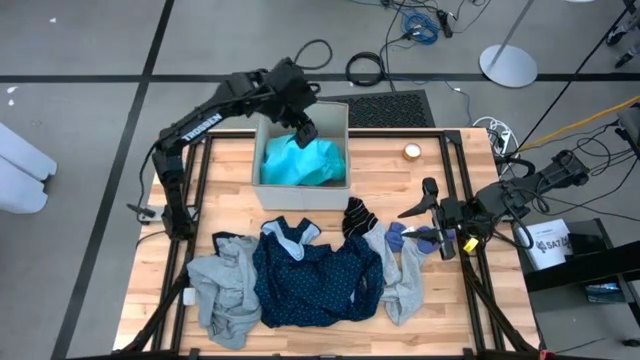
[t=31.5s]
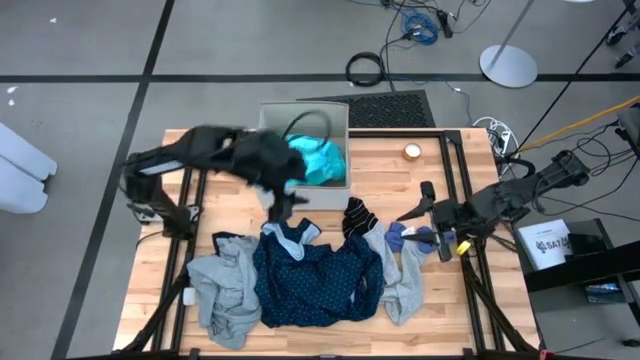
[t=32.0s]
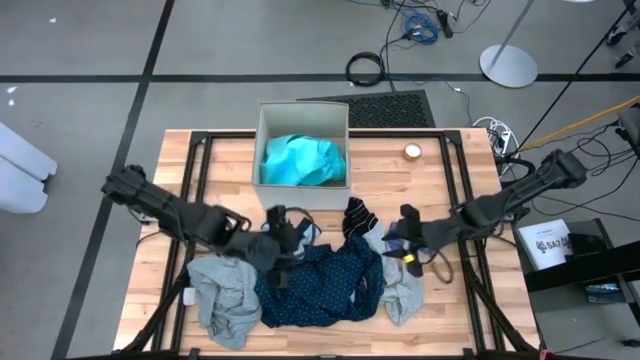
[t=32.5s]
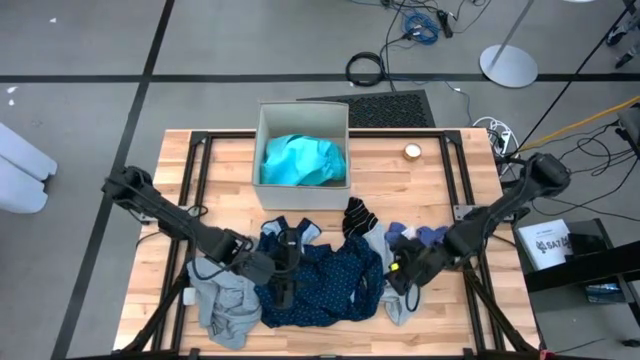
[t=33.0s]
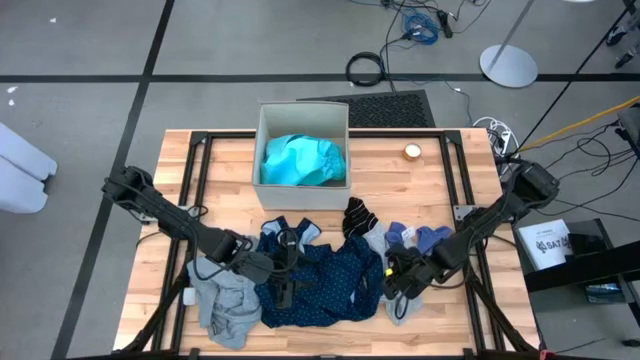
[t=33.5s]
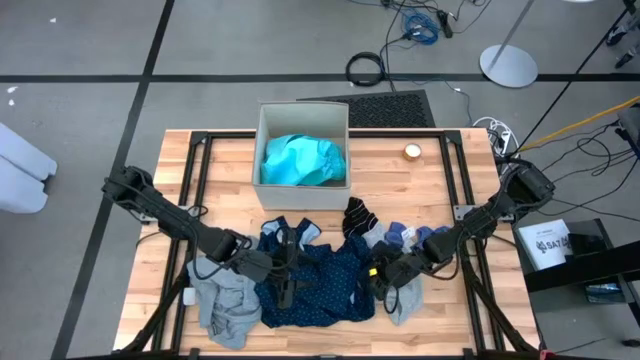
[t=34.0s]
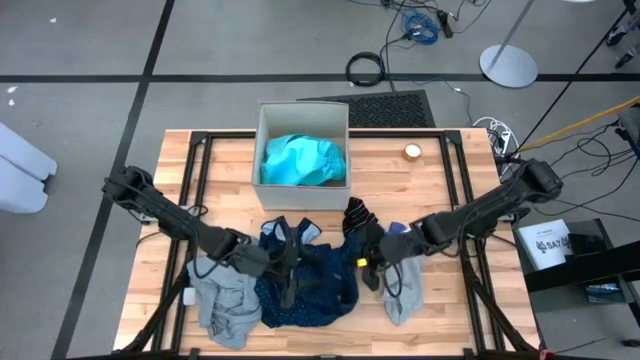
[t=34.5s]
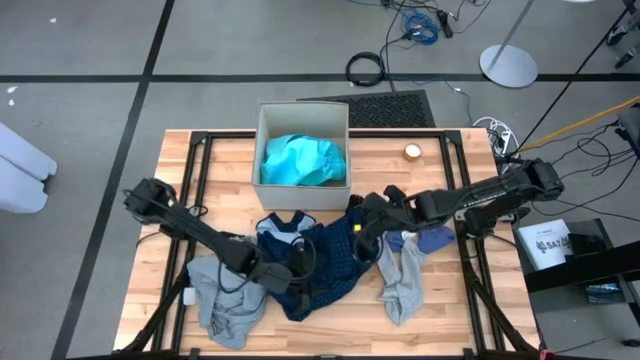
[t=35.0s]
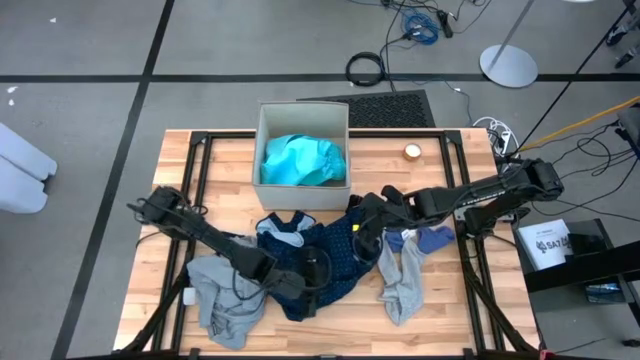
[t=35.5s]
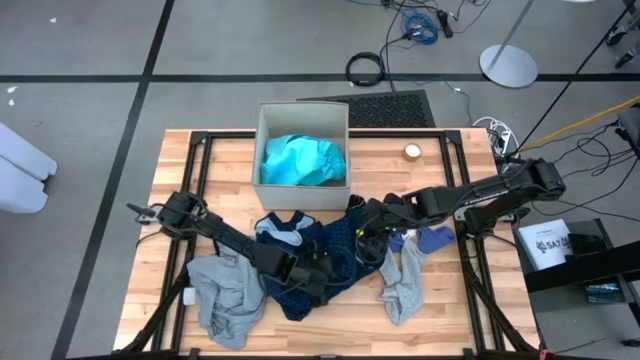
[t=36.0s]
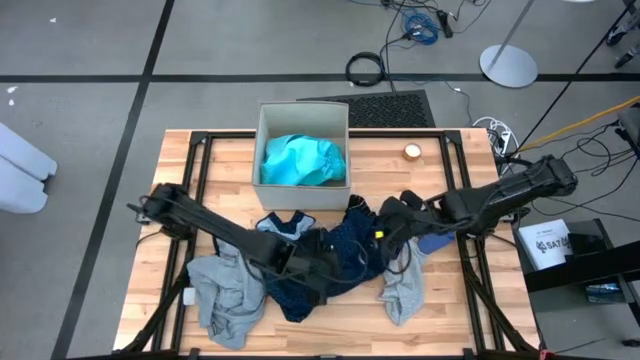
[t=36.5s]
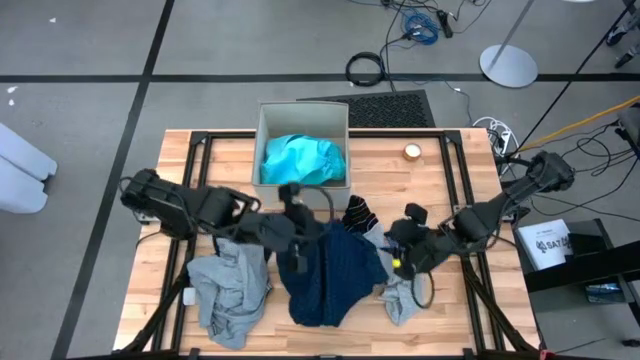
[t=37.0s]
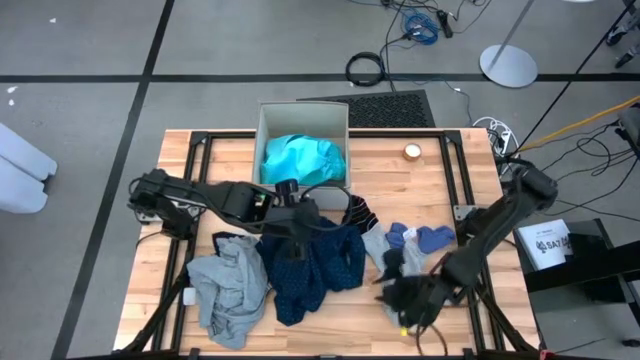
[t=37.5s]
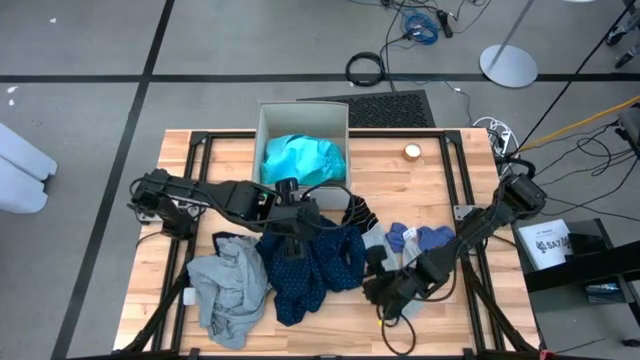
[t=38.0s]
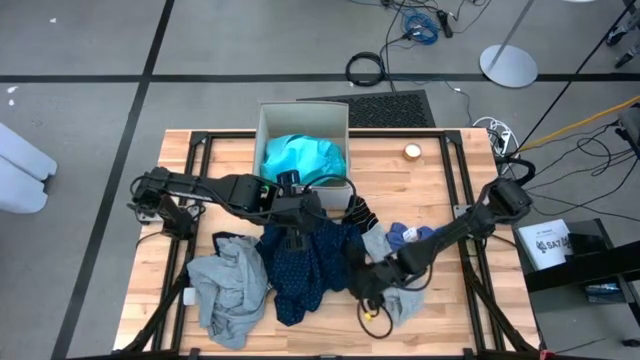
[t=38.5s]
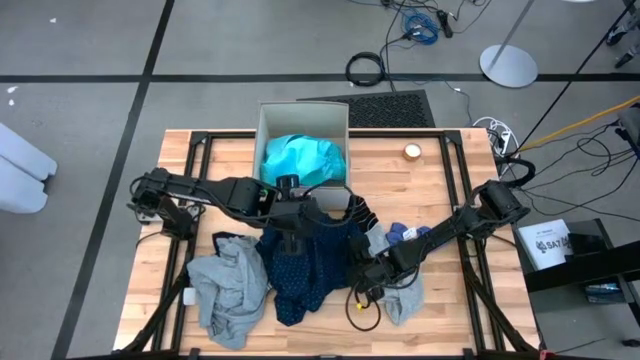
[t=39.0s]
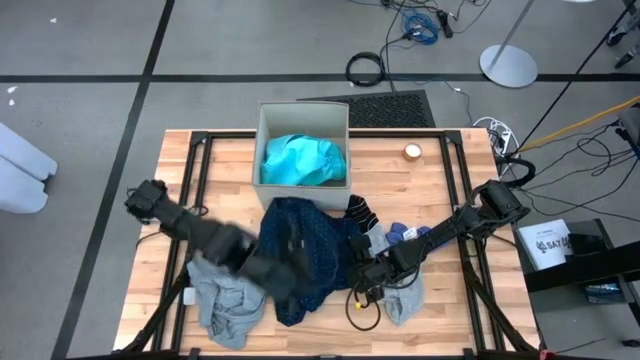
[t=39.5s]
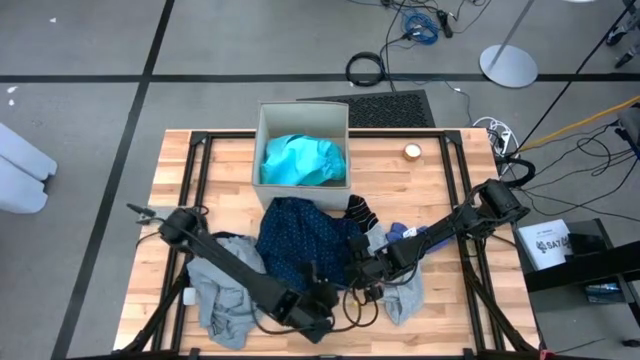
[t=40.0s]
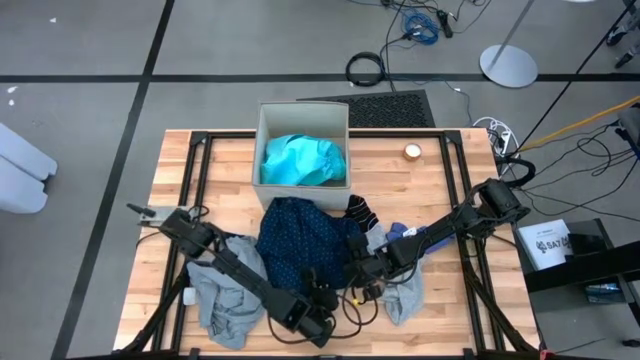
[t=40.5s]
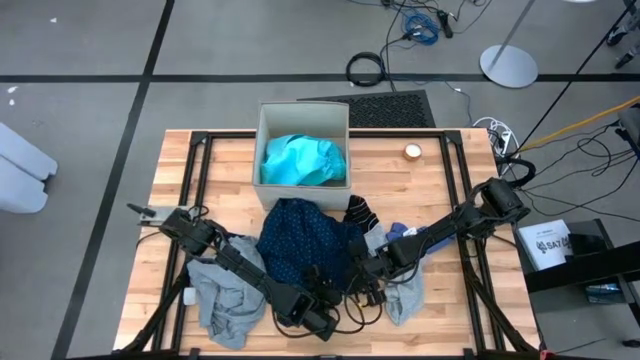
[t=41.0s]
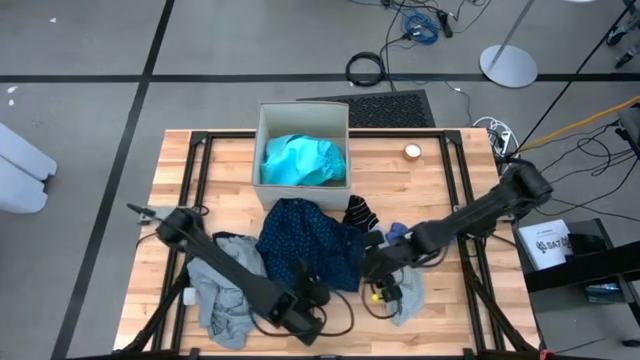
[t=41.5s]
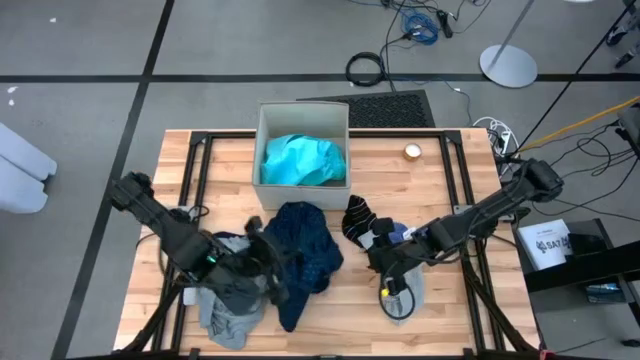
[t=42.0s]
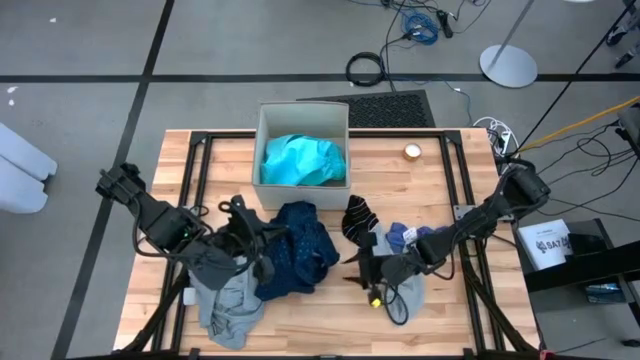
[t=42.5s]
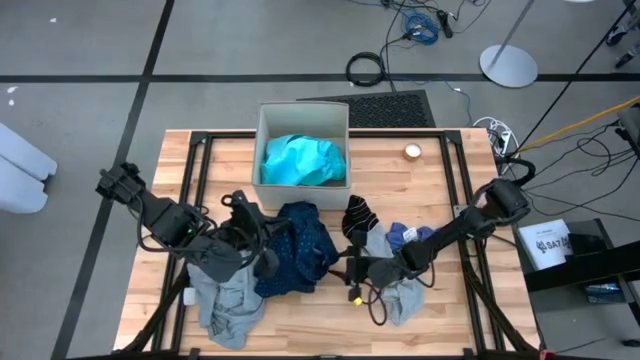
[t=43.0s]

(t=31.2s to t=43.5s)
Task: Sort clothes
Put the dark blue polo shirt into the white laundry organizer

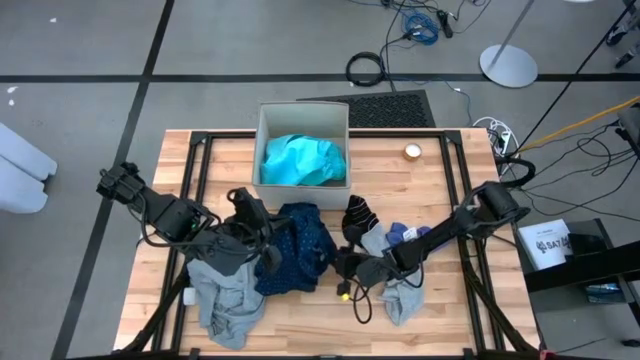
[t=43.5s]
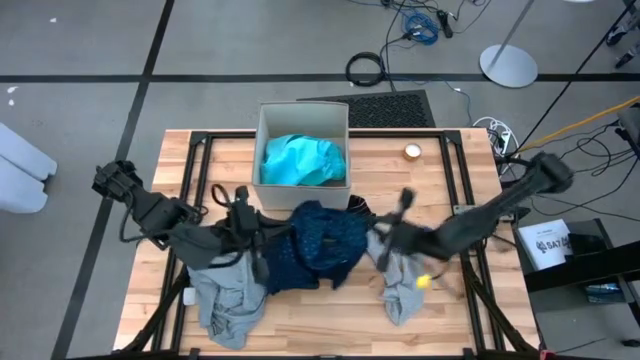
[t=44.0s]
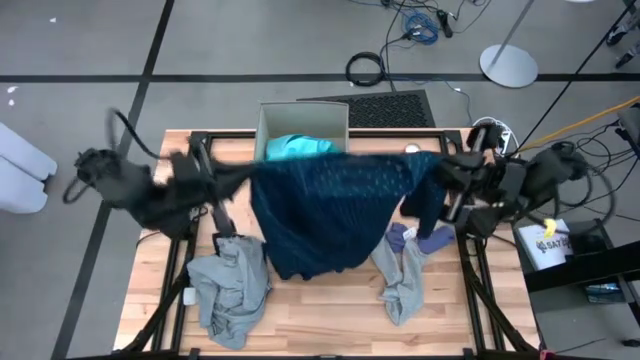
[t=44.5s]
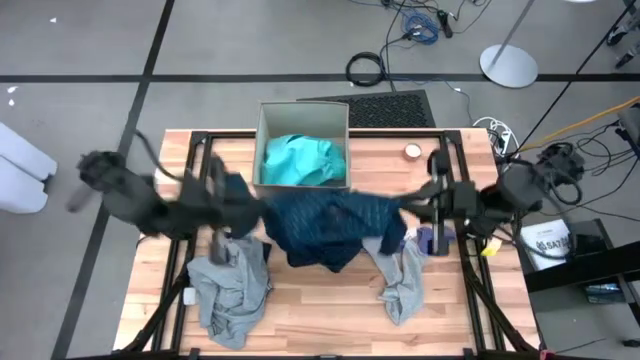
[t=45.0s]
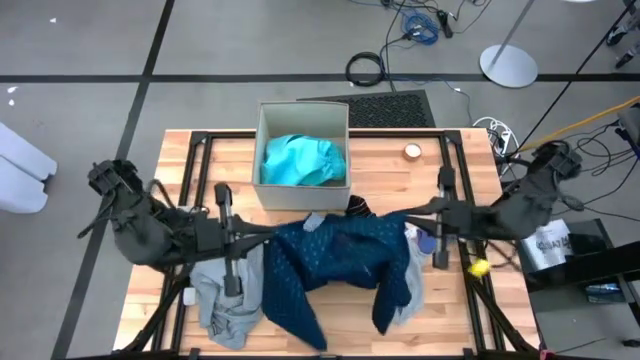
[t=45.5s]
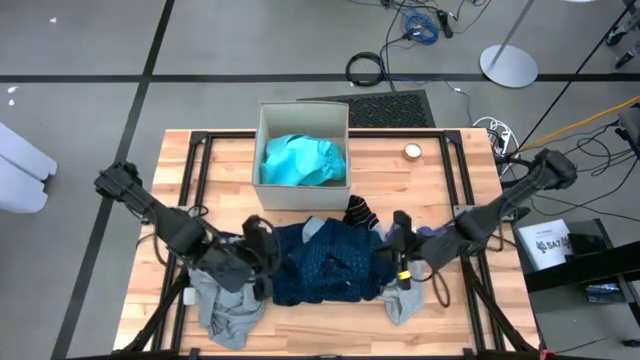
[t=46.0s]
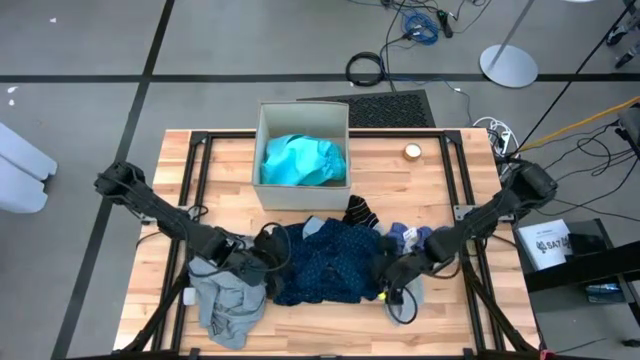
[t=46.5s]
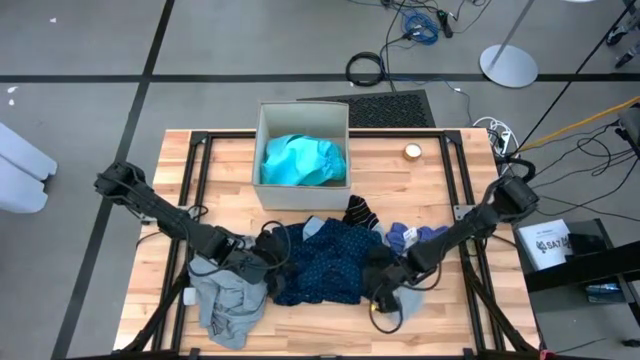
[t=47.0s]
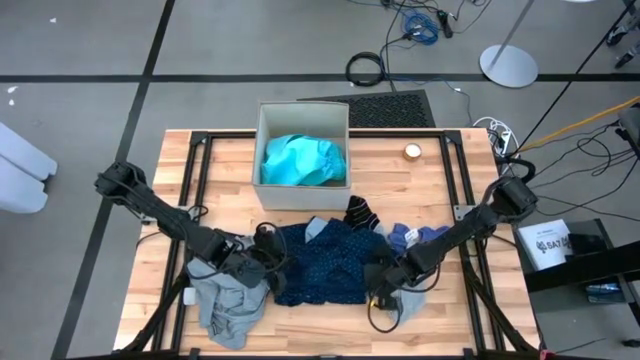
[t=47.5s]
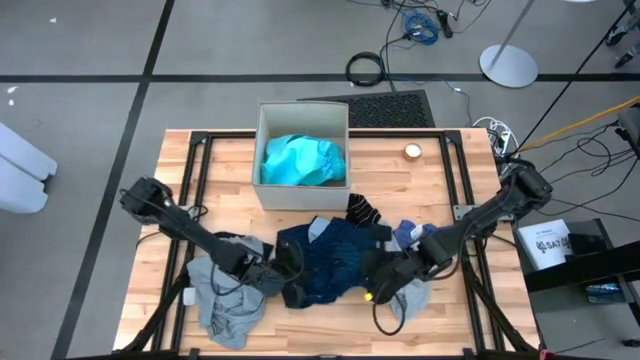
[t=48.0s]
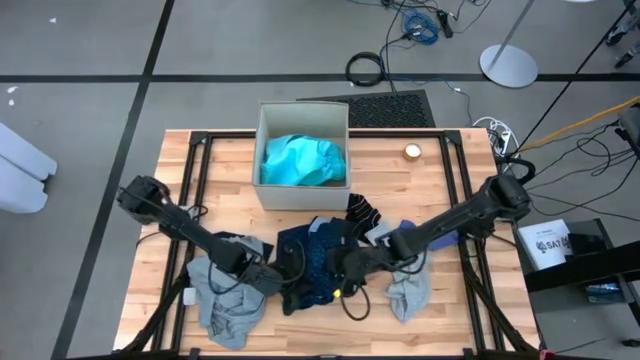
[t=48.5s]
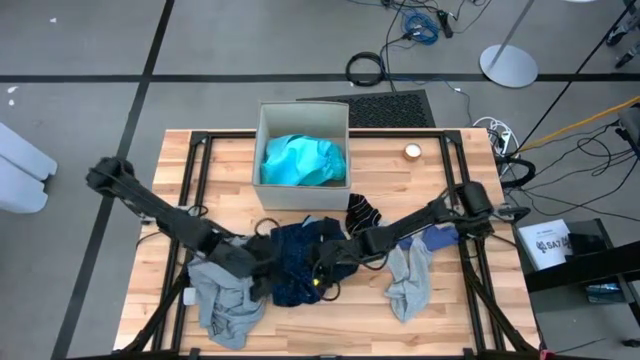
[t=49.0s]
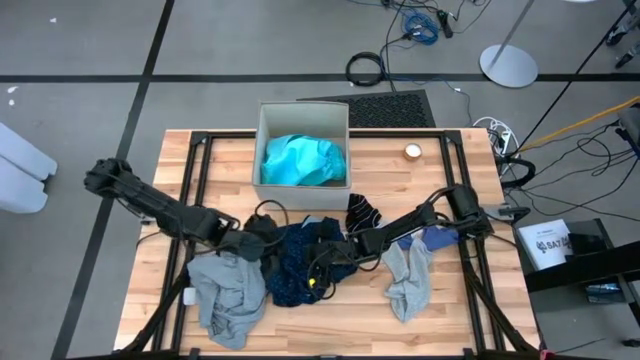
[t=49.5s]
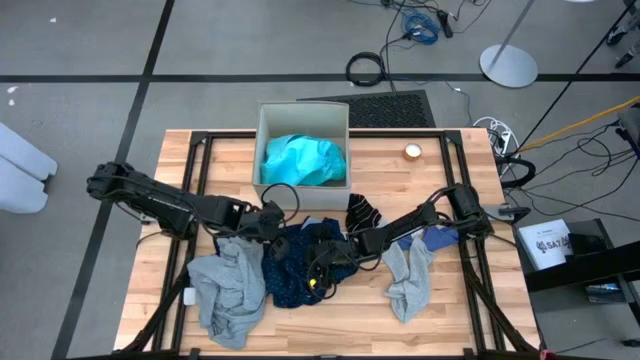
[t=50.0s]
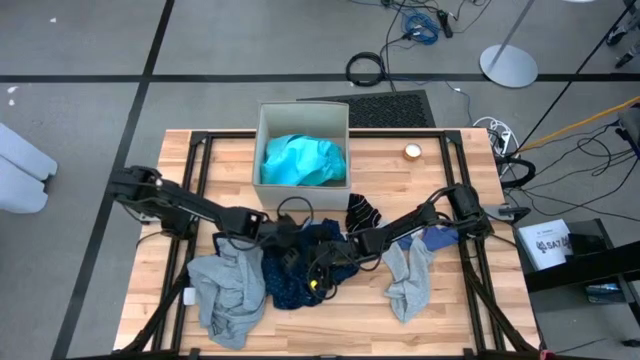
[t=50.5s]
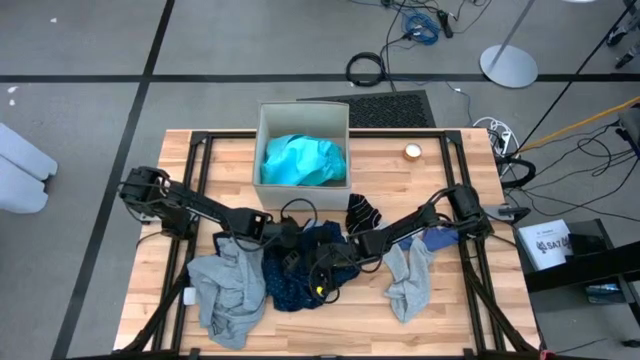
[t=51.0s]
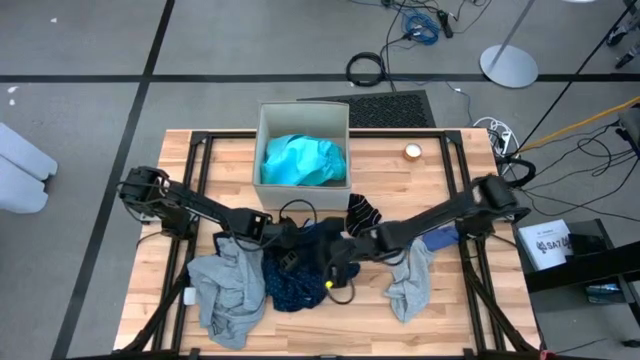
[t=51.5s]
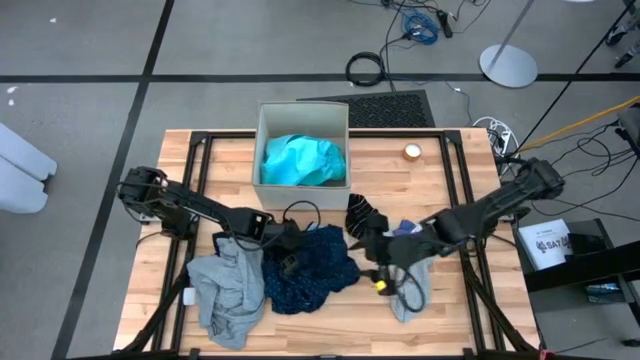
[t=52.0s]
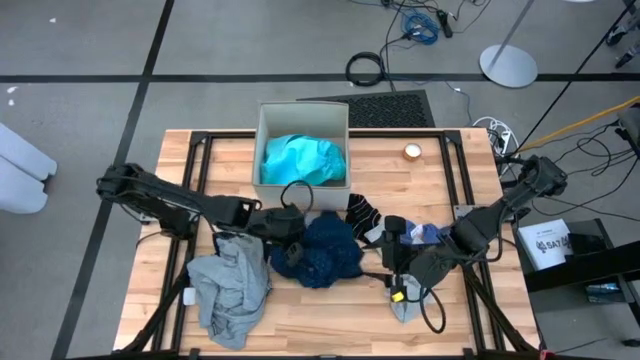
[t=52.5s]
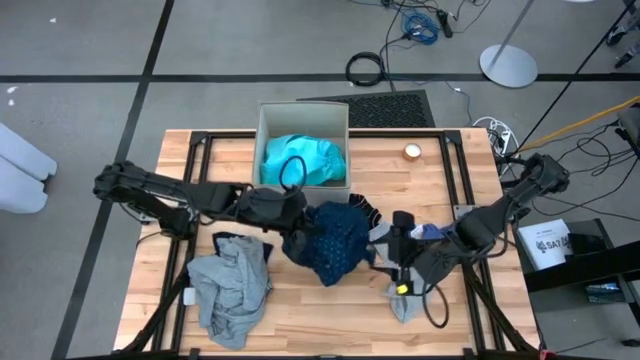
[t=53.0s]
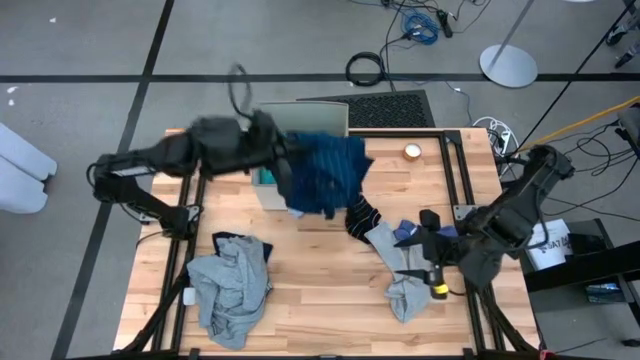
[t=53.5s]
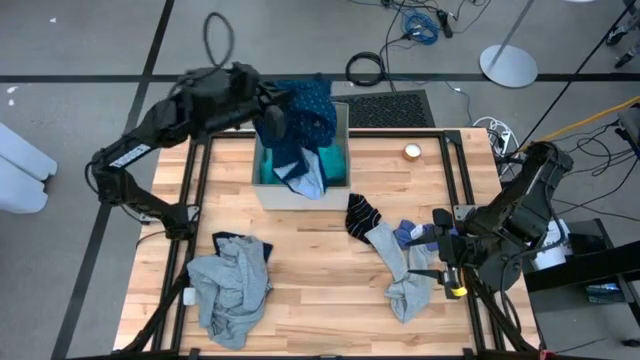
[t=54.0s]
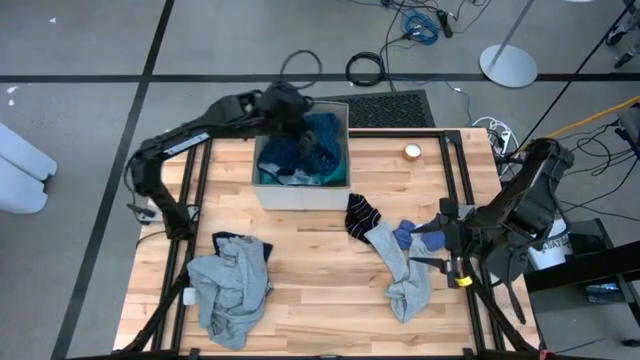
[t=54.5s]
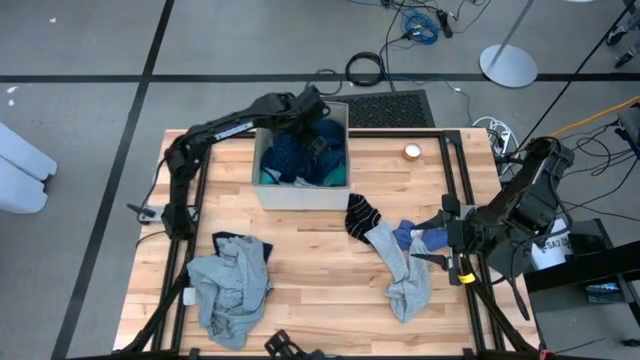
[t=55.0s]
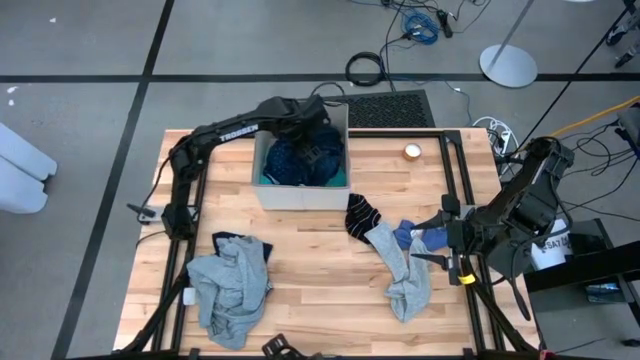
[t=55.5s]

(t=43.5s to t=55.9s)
Put the dark blue polo shirt into the white laundry organizer
